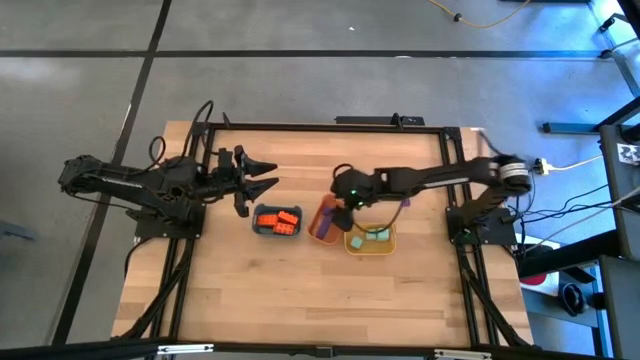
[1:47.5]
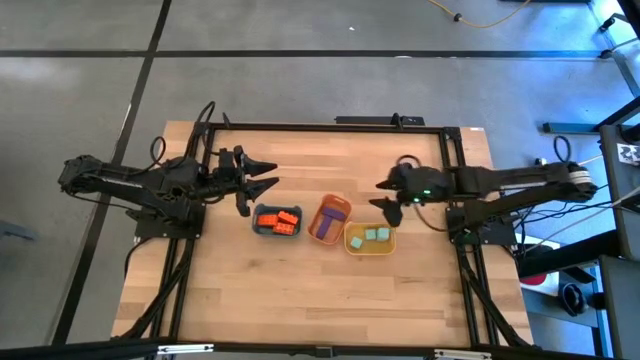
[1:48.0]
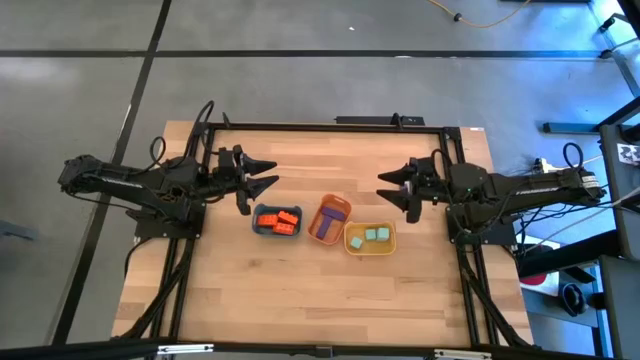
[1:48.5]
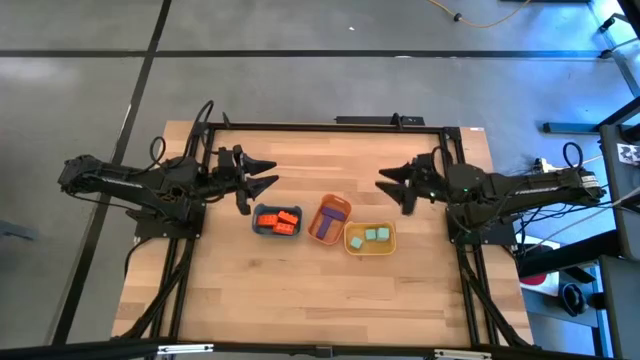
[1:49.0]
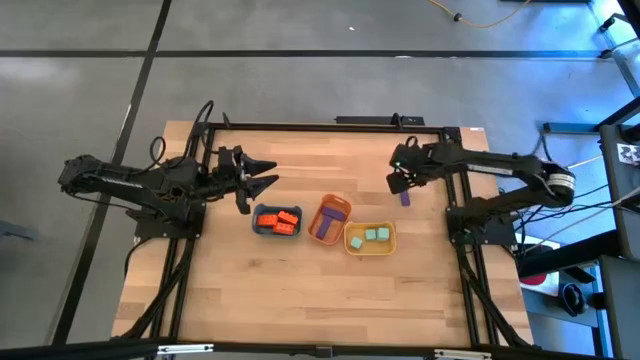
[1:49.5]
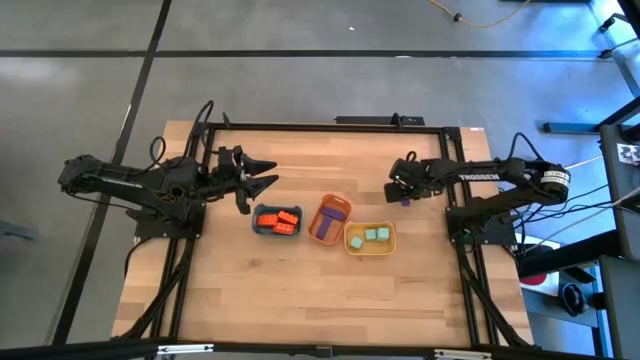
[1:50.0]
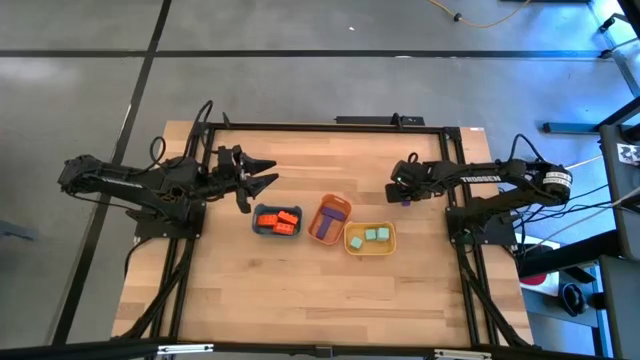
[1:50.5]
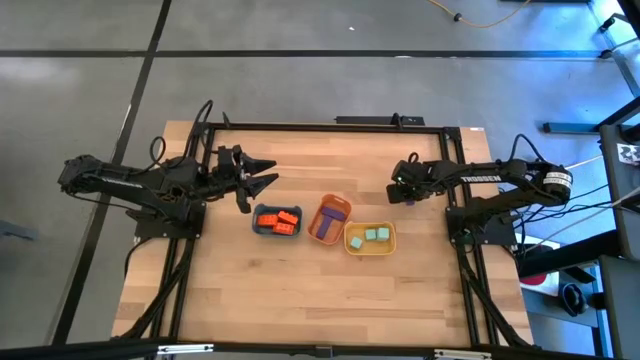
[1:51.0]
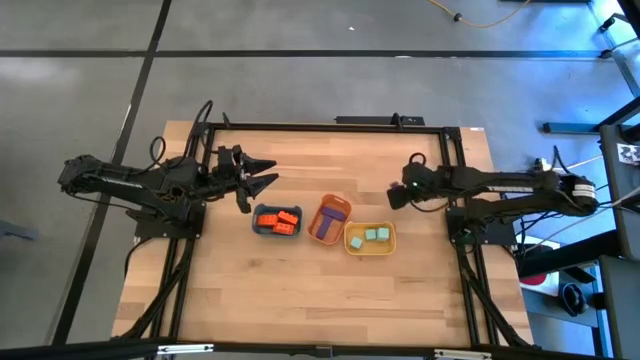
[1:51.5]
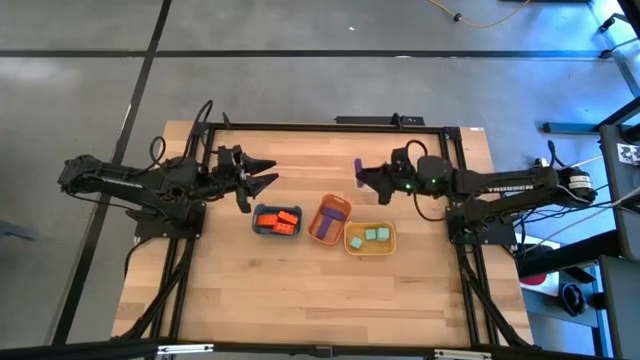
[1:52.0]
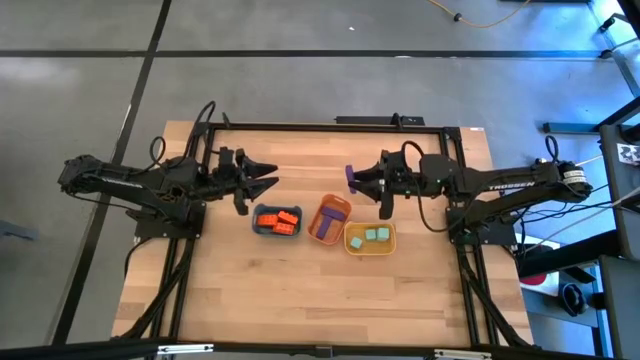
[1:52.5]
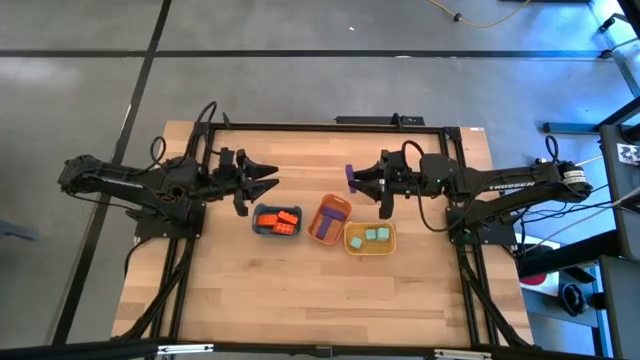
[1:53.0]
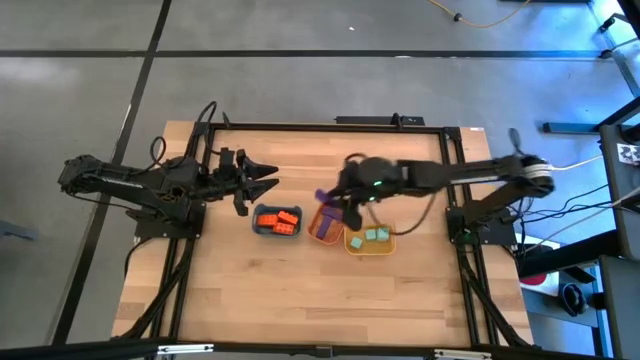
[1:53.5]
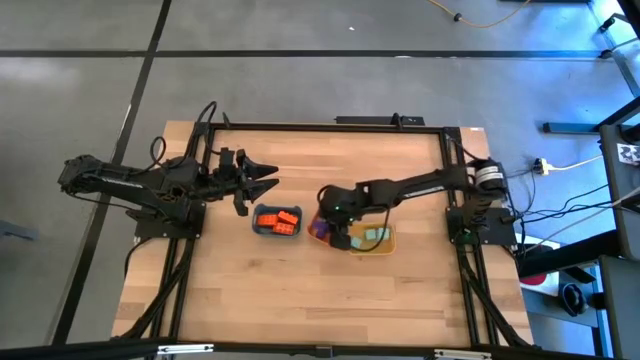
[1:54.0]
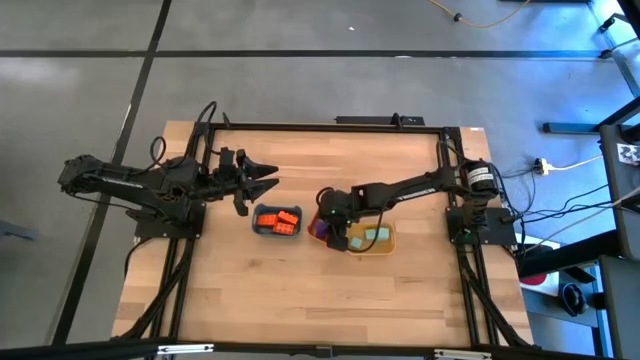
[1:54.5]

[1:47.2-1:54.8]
Task: Sort & place blocks by color
Put the purple rectangular block into the orange bin

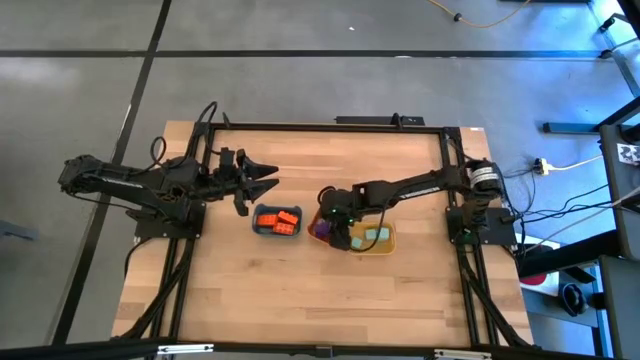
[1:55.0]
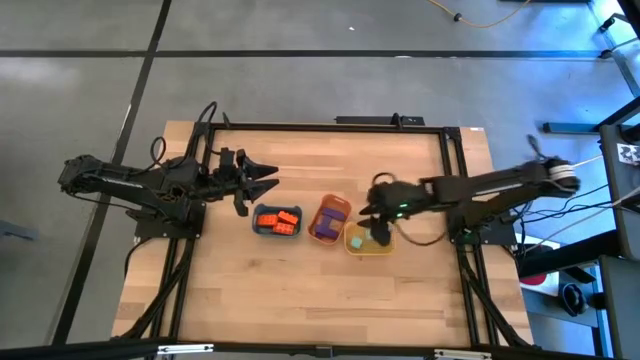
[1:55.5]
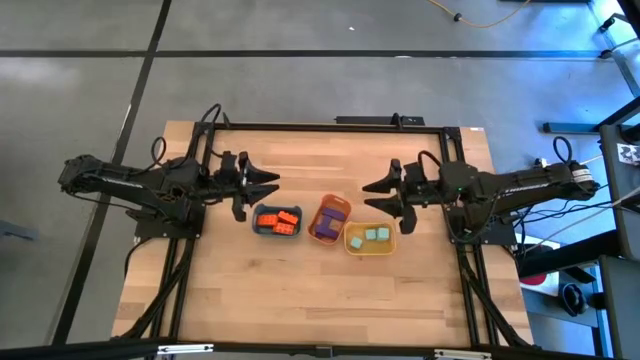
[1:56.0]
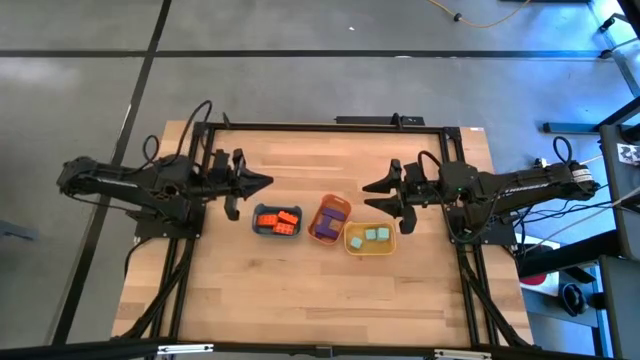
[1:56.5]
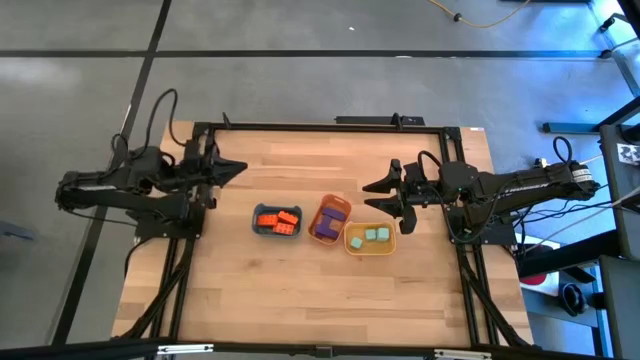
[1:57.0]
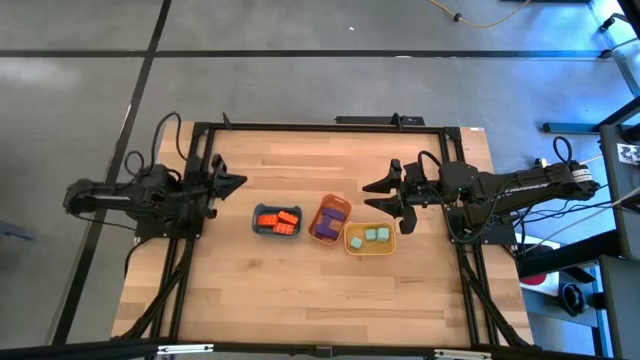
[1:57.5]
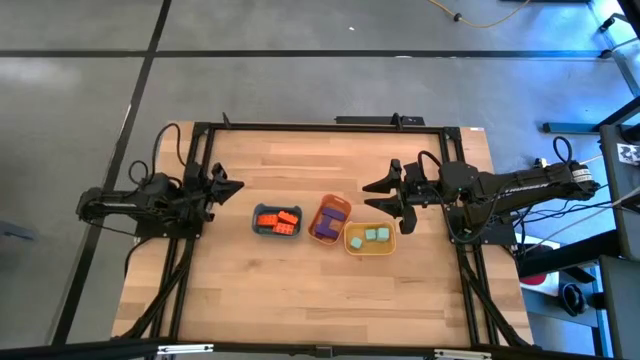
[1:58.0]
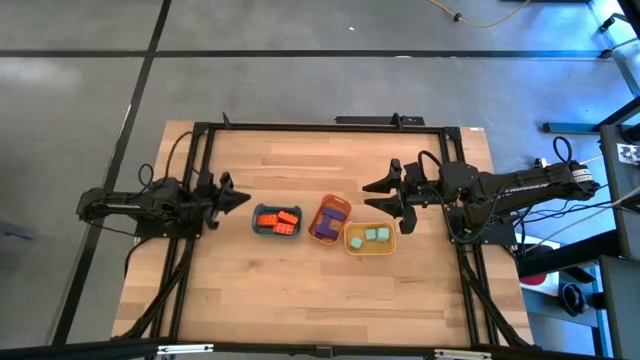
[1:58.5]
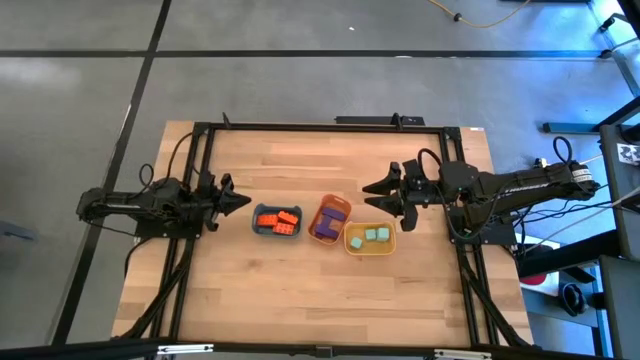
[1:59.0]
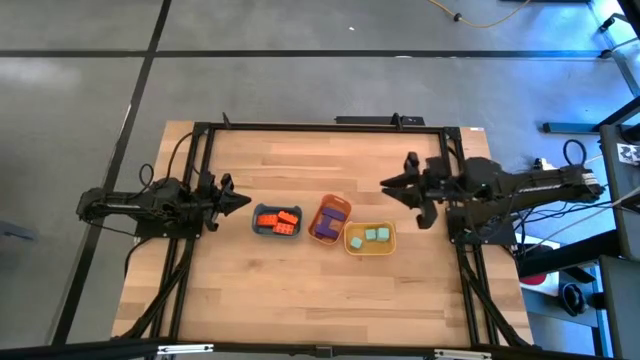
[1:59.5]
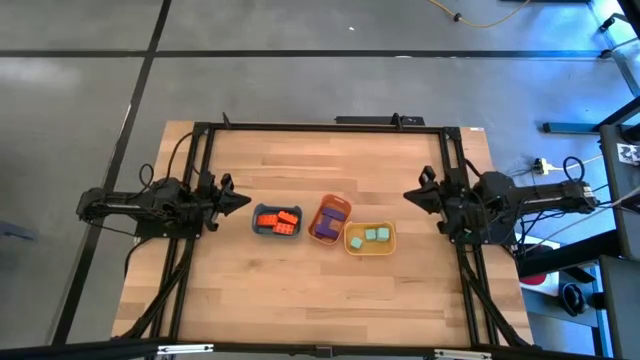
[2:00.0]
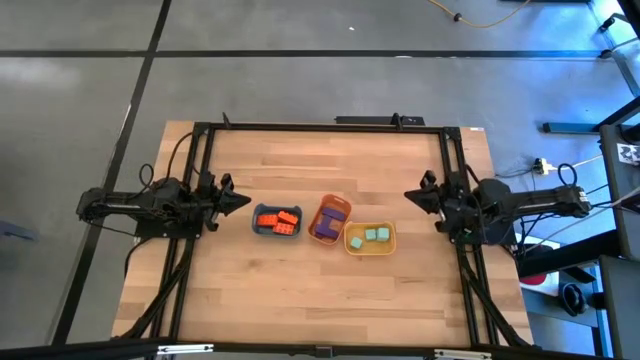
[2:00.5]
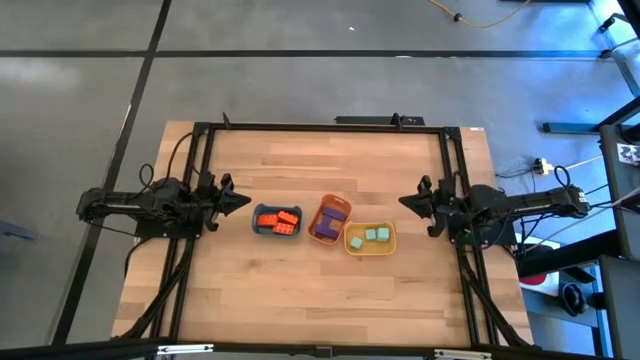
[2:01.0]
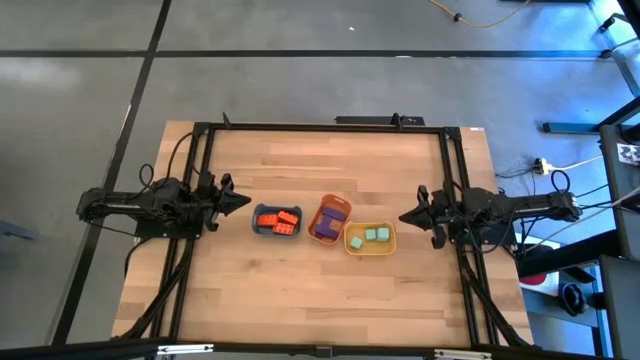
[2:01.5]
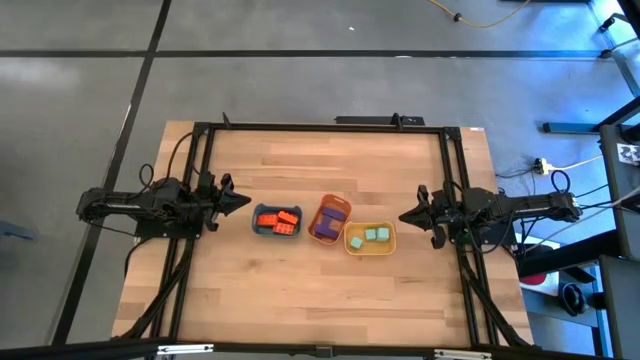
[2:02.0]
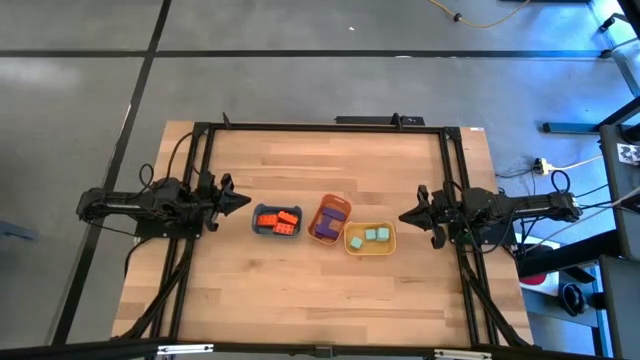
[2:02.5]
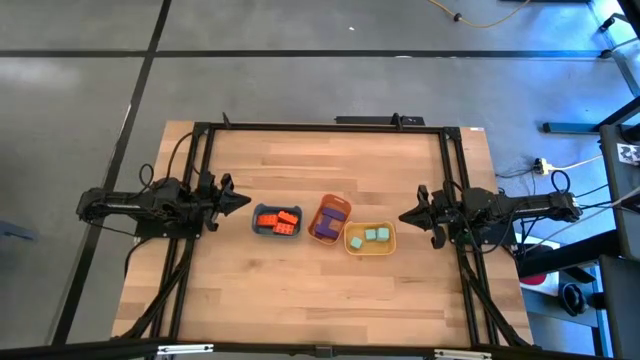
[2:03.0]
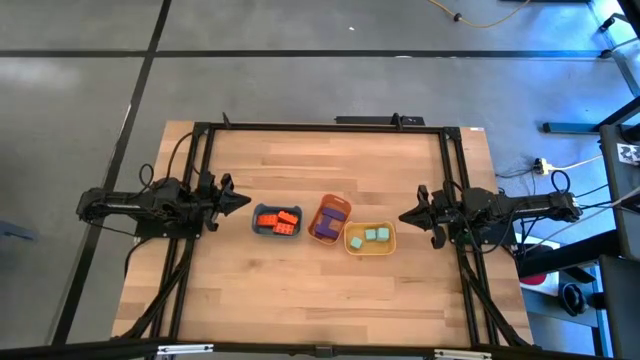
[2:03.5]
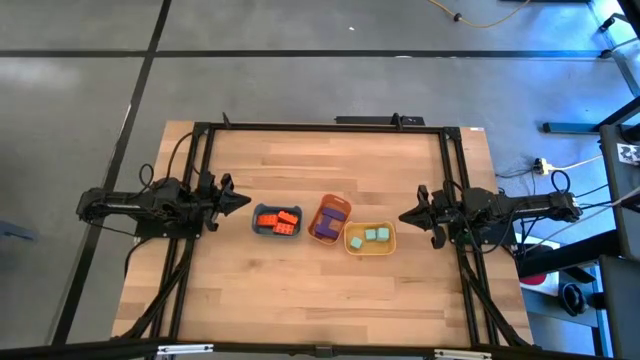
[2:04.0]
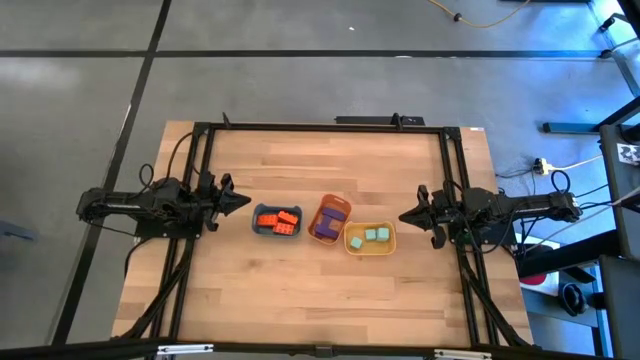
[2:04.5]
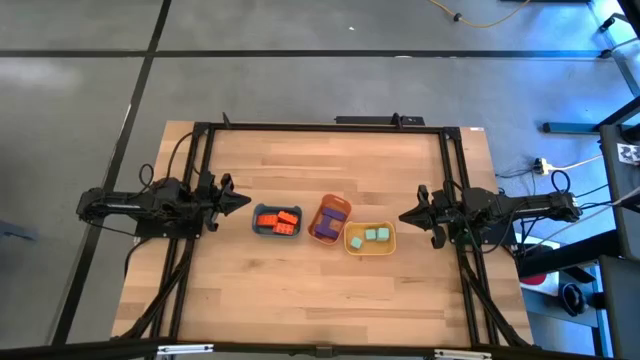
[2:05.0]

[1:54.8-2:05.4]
Return to Home Position

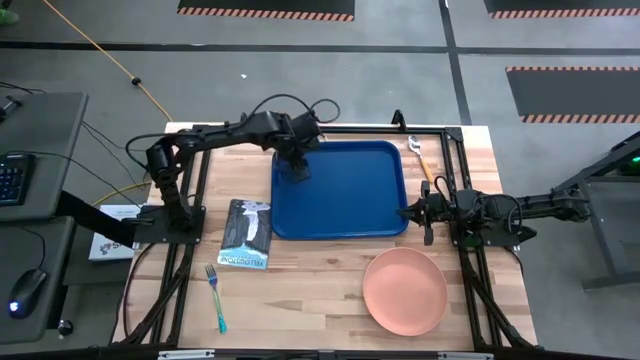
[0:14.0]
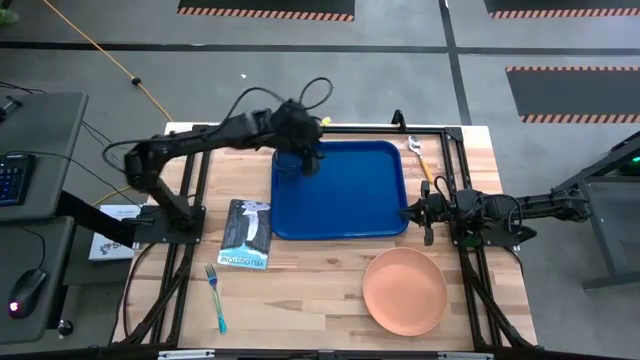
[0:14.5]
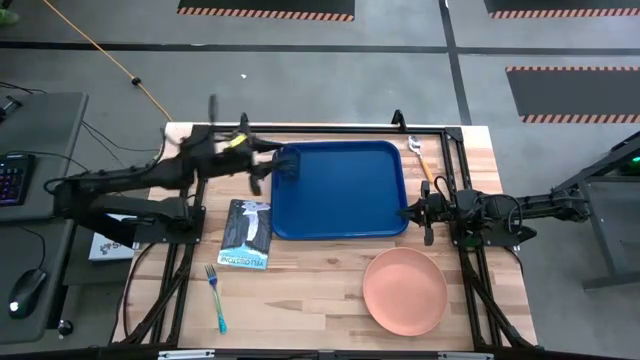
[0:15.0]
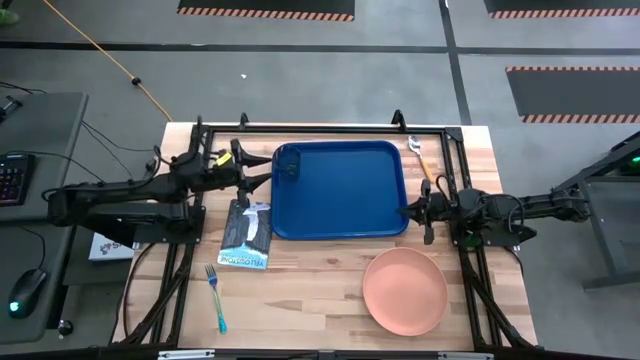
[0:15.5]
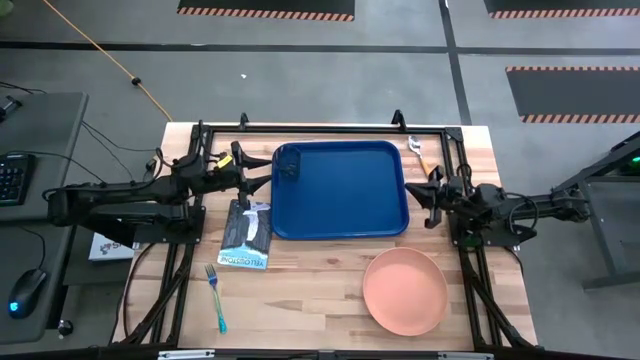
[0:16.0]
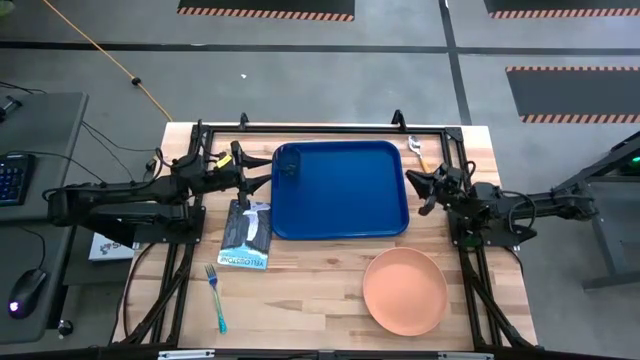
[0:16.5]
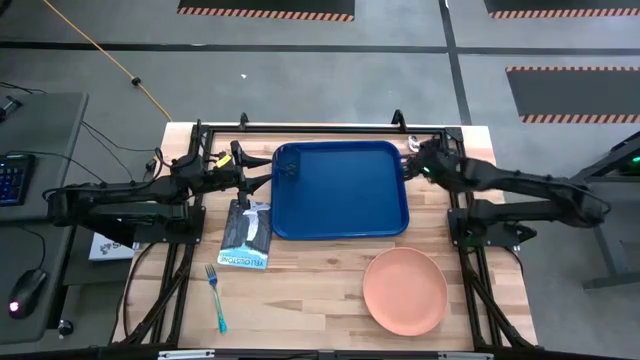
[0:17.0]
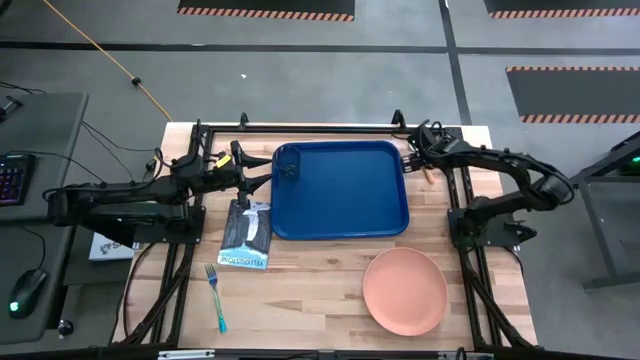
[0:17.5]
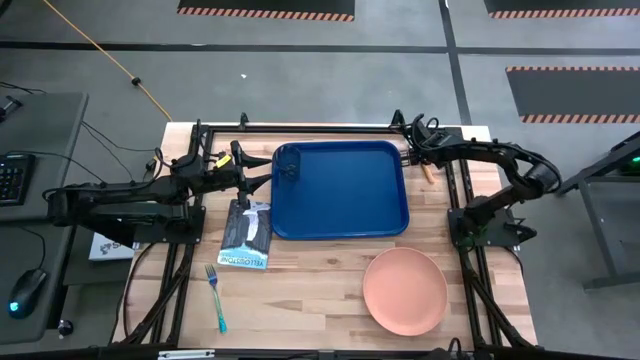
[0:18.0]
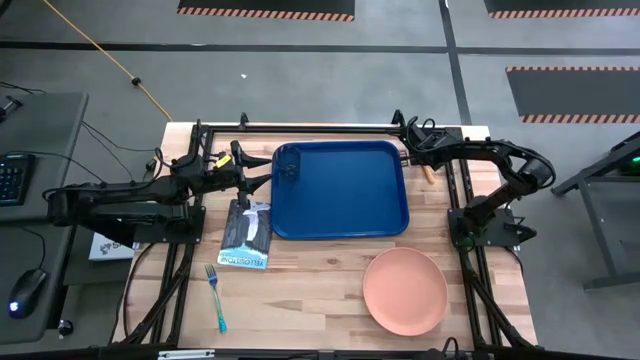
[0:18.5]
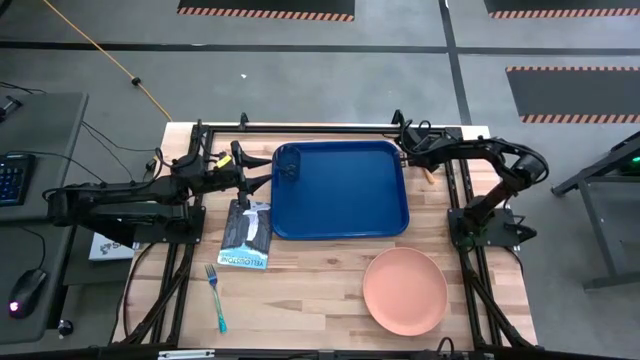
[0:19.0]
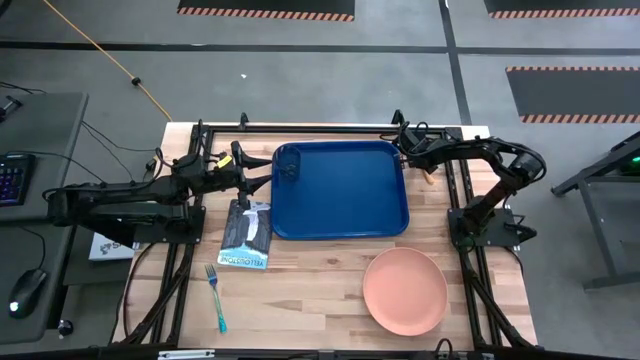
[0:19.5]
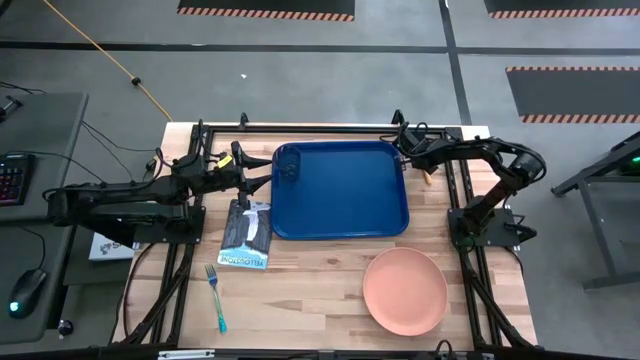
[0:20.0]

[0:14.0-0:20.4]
Task: Pick and place plate/cup/fork/spoon on tray
Put the yellow spoon on the right side of the blue tray
